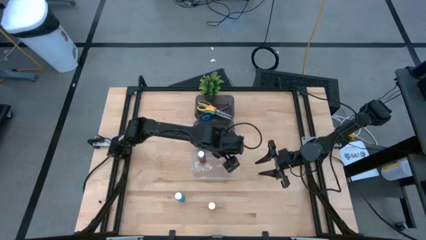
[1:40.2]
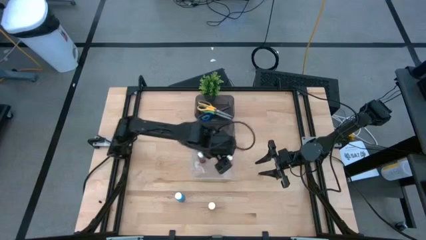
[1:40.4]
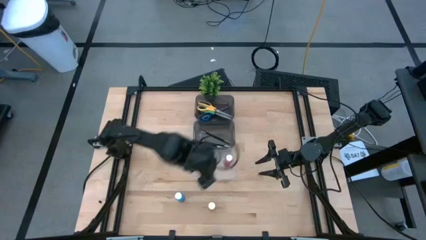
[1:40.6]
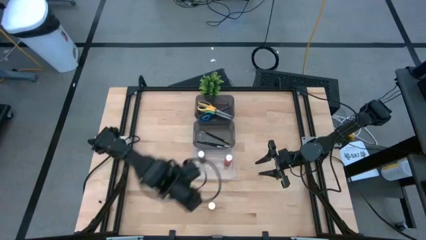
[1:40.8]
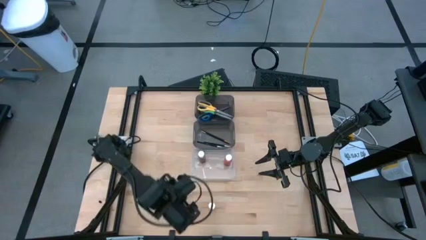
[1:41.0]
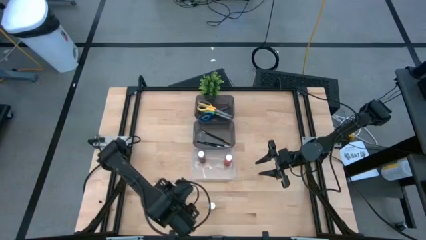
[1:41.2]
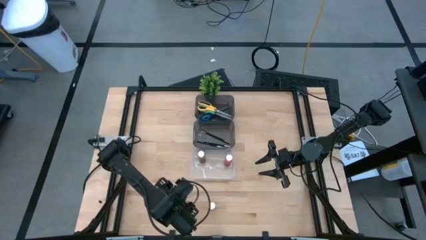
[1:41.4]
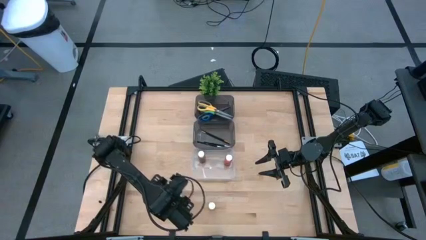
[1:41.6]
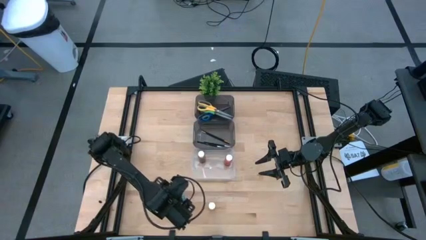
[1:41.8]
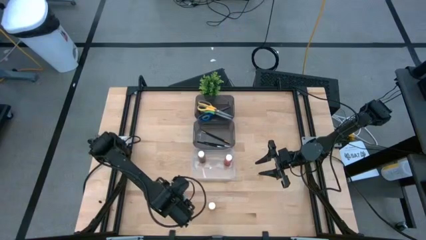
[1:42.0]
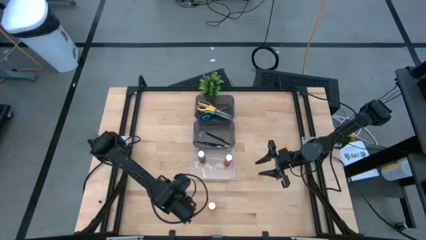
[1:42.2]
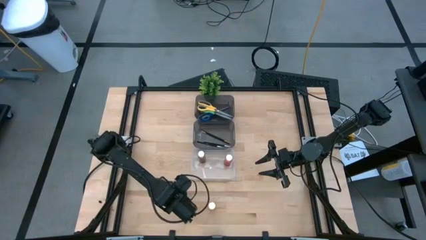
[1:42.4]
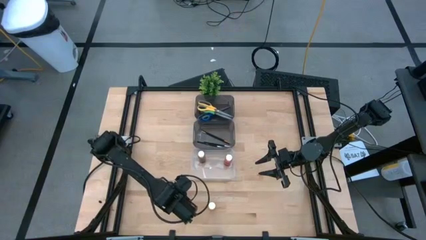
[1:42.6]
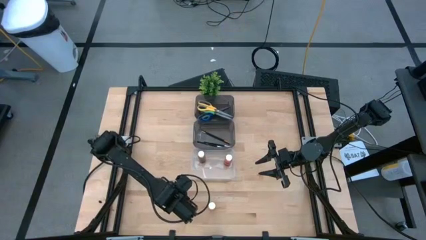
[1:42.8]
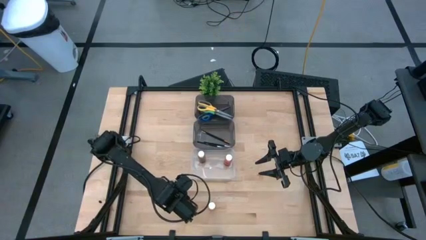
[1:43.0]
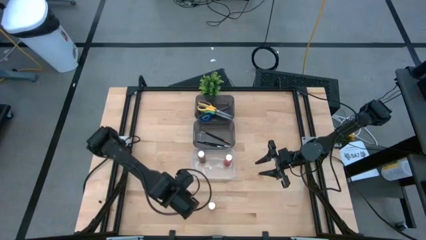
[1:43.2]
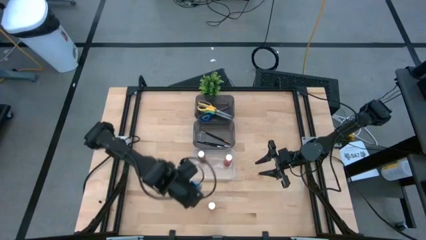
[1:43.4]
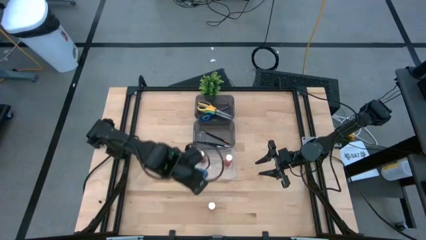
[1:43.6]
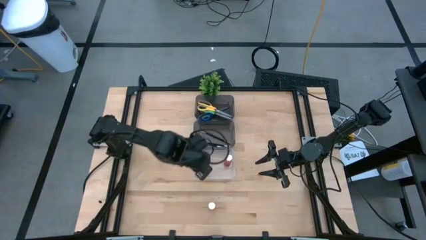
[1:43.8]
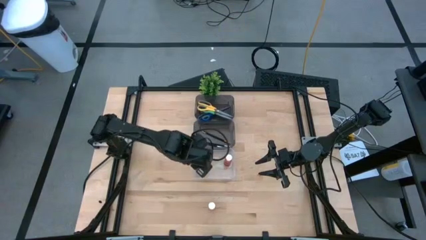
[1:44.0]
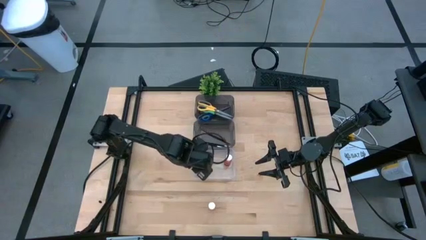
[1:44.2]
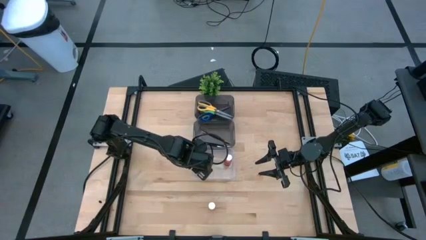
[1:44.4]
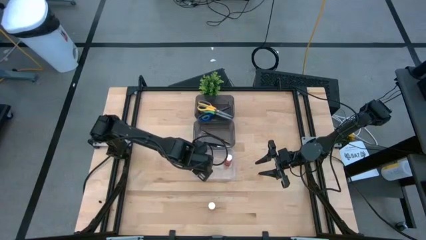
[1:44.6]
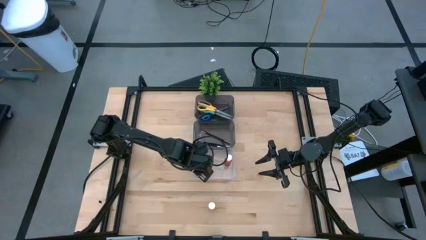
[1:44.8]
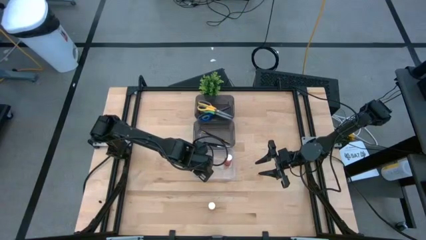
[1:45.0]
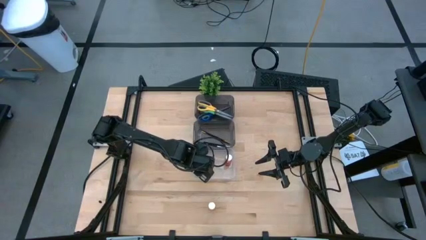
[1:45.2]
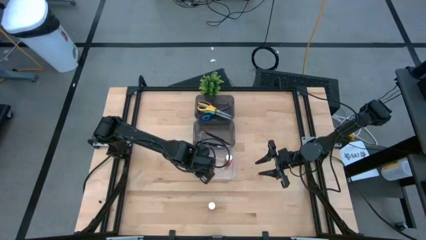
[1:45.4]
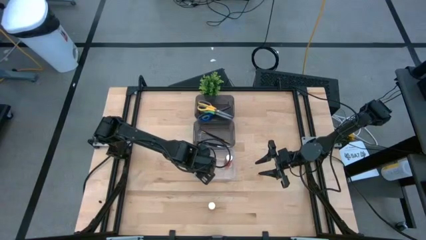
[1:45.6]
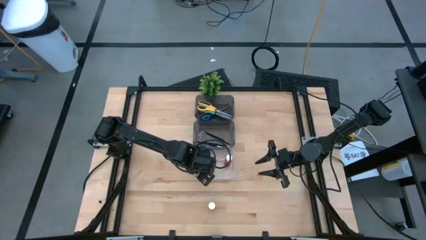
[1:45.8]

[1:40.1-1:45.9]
Task: Pick & Place Paint Supplies
Put the blue paint bottle into the transparent bin

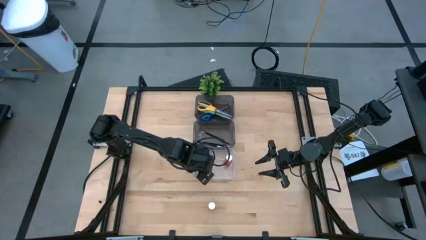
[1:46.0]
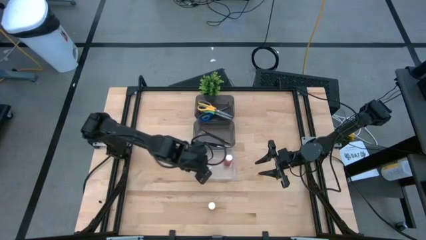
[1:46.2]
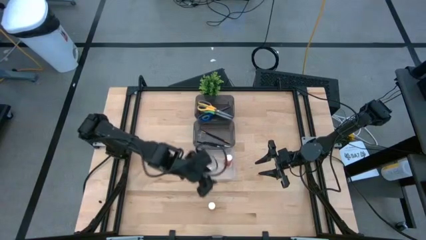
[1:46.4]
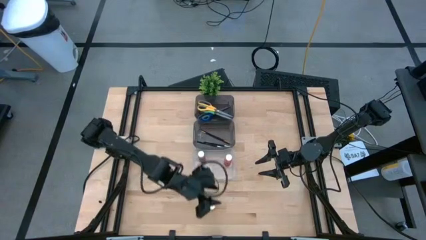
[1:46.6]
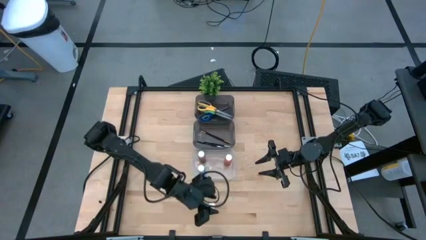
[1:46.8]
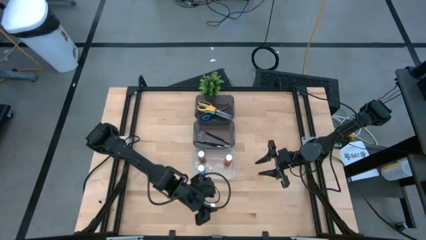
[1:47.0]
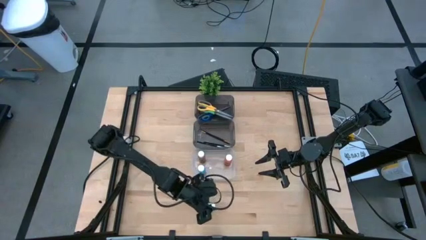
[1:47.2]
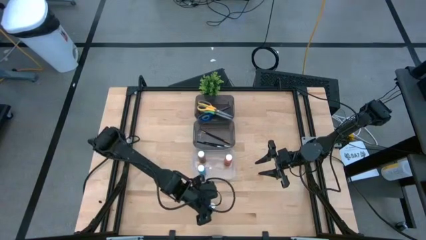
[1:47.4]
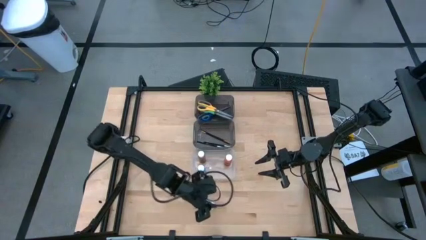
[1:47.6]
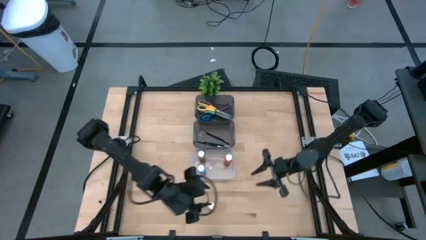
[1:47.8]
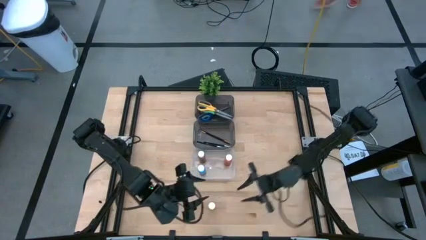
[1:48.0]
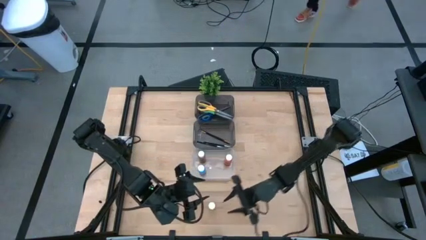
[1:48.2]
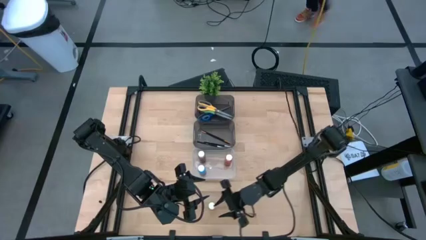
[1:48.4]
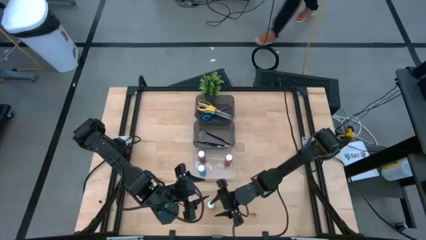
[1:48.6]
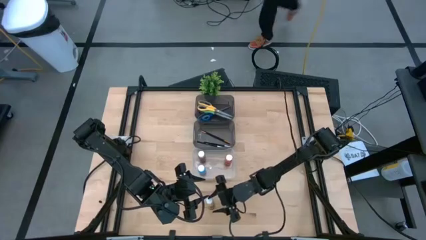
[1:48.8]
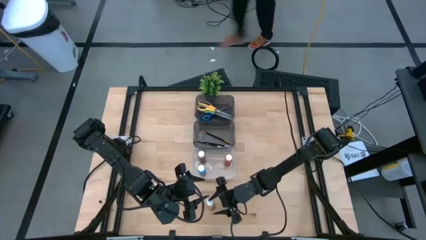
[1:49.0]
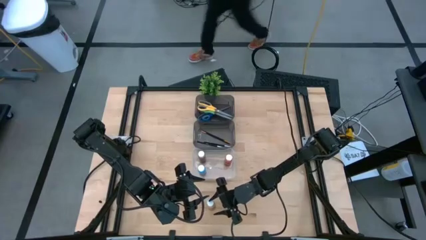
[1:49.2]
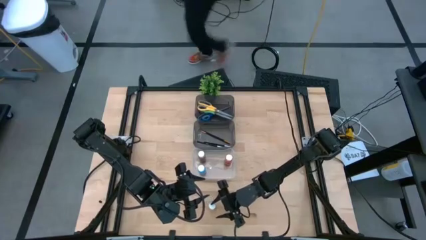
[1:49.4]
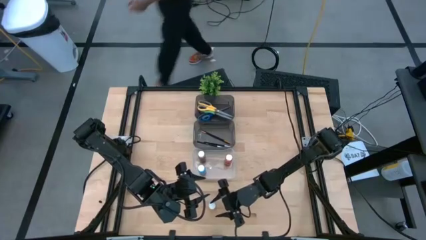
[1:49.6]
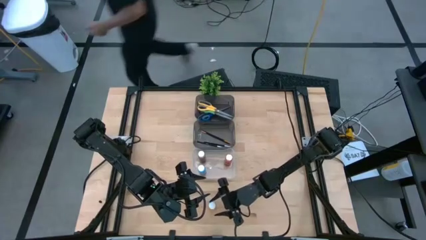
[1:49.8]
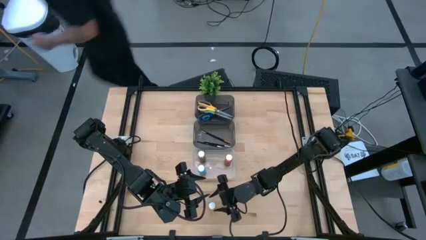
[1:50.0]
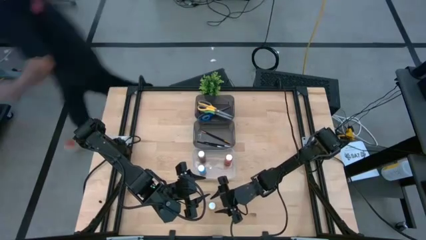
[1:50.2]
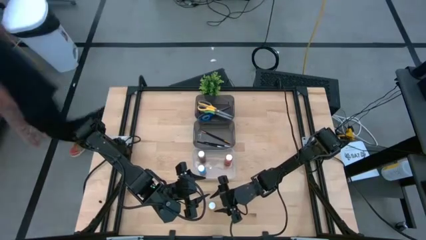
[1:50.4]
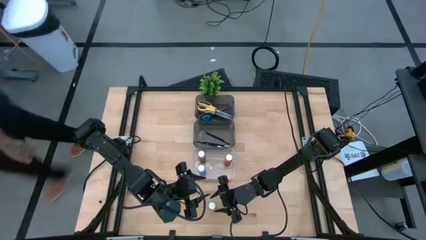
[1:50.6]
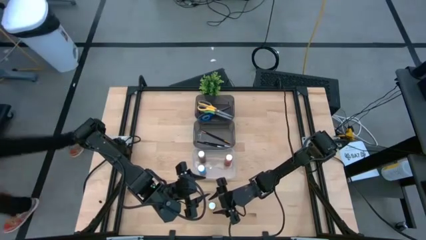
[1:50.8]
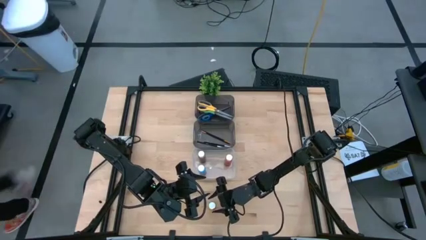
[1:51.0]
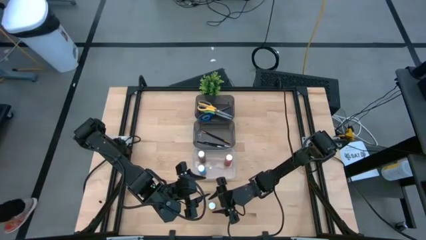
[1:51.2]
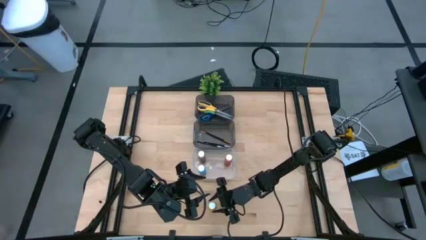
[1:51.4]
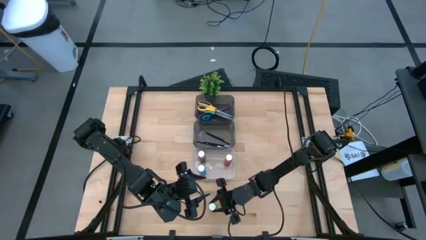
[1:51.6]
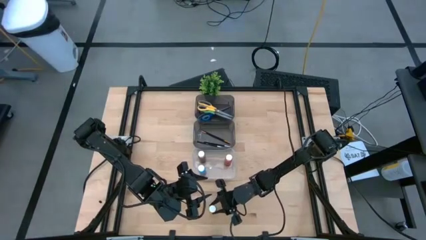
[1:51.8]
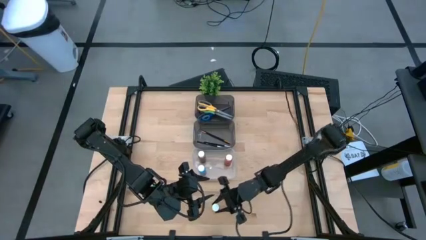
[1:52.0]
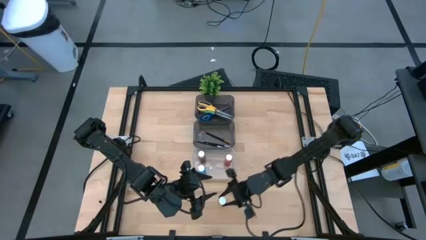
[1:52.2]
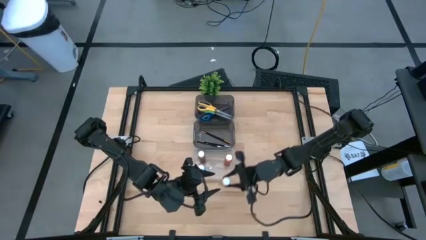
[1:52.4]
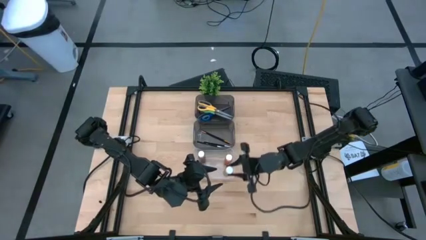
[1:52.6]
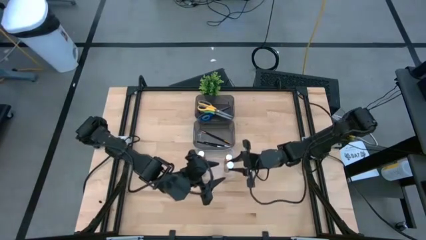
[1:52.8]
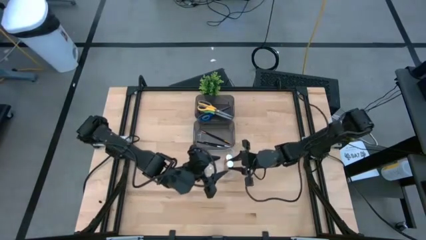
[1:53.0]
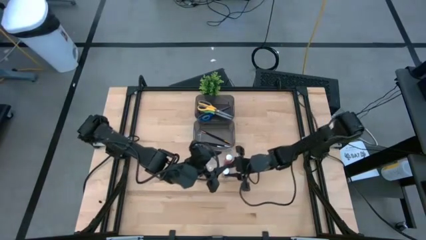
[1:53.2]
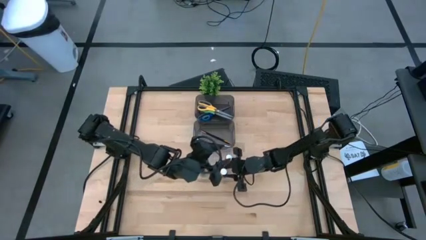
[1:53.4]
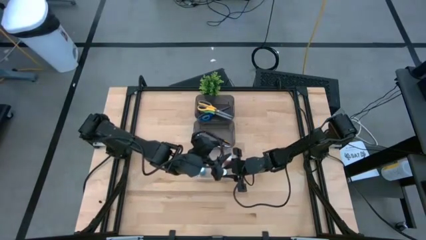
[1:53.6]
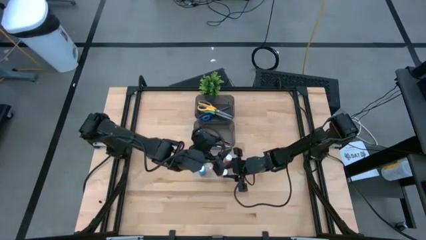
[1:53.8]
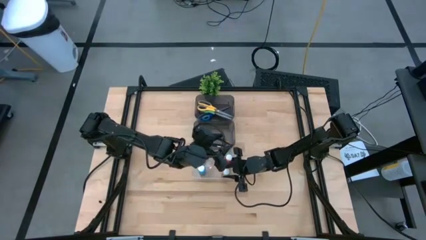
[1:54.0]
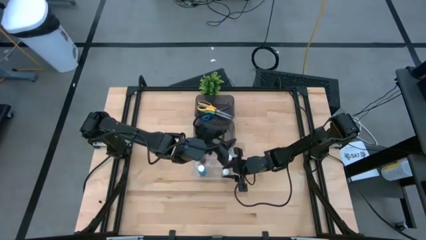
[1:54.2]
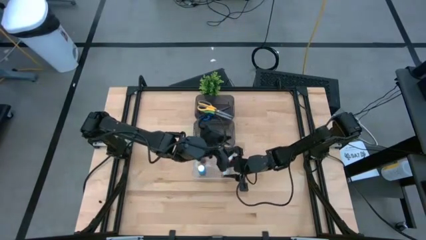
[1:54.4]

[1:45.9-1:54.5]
Put the yellow paint bottle into the transparent bin

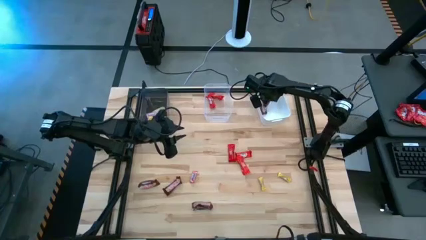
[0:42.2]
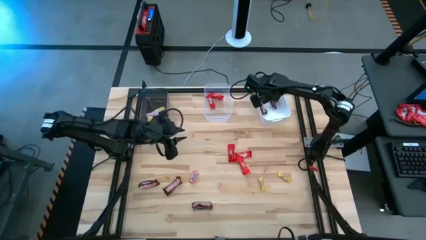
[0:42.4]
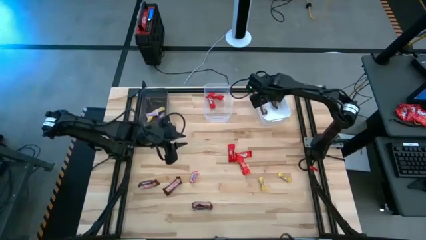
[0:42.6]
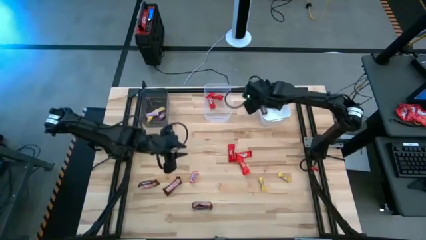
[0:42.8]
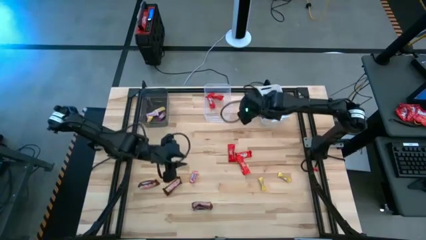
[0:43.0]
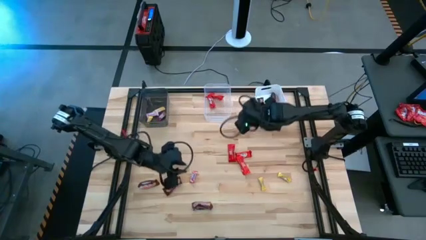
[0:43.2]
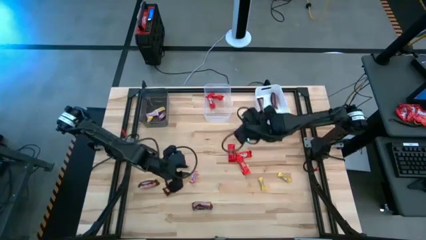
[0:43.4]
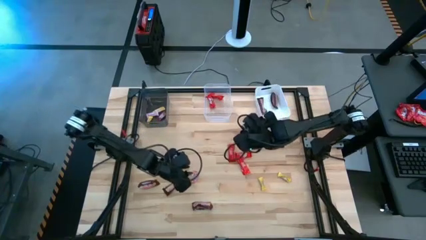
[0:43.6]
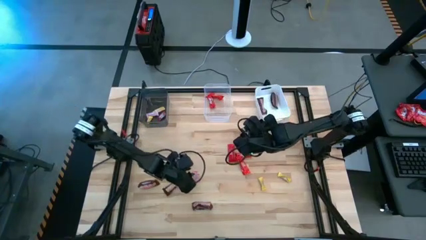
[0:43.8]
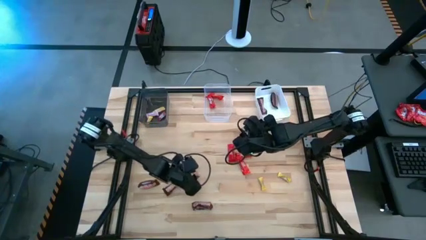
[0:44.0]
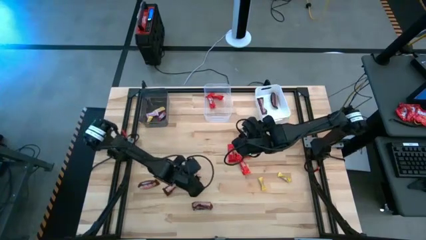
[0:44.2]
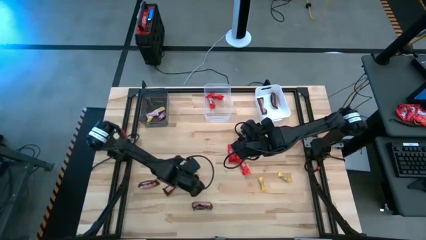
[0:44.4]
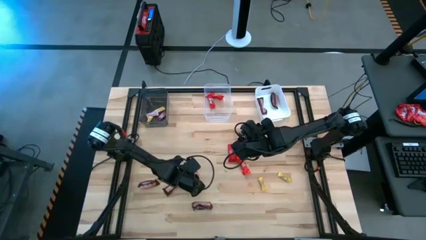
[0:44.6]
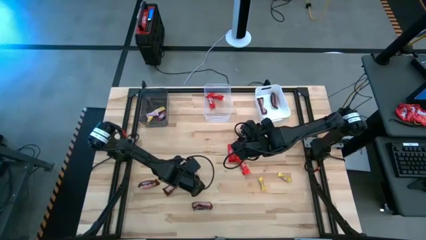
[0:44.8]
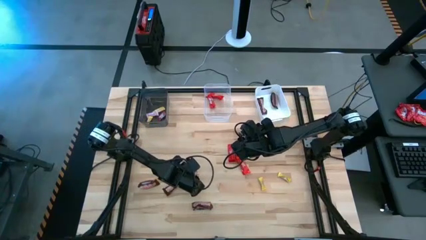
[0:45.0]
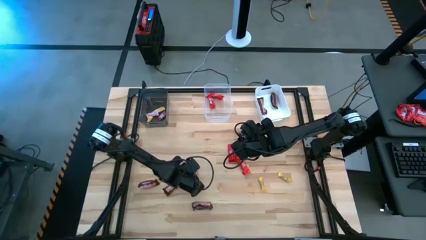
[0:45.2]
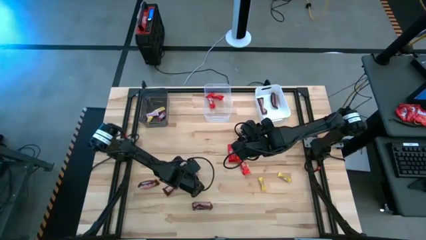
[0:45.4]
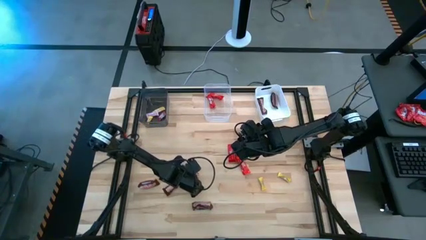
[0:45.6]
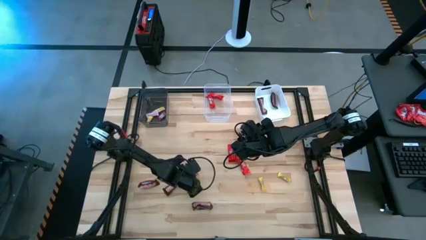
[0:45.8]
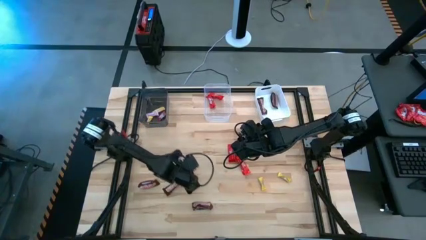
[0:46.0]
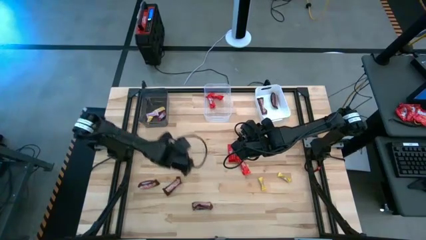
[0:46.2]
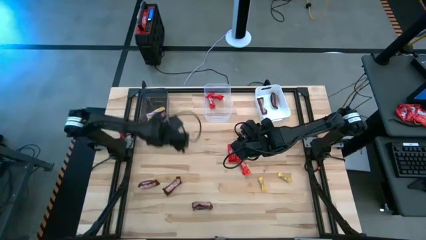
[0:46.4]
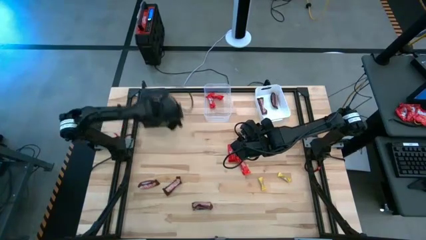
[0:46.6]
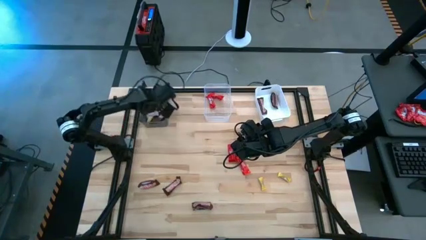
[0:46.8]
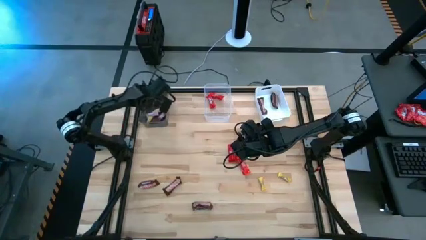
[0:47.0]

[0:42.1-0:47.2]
Task: Sort candy by brand, put in halloween buckets
Put the light red candy into the black bin
